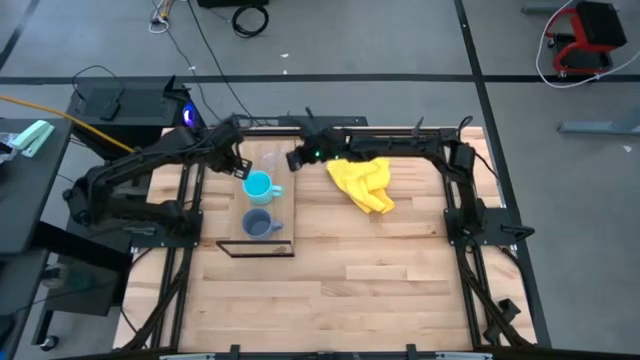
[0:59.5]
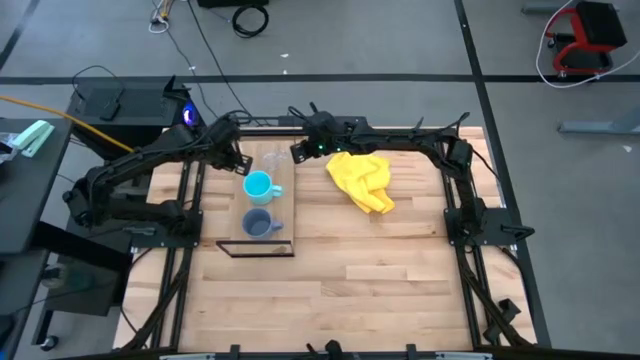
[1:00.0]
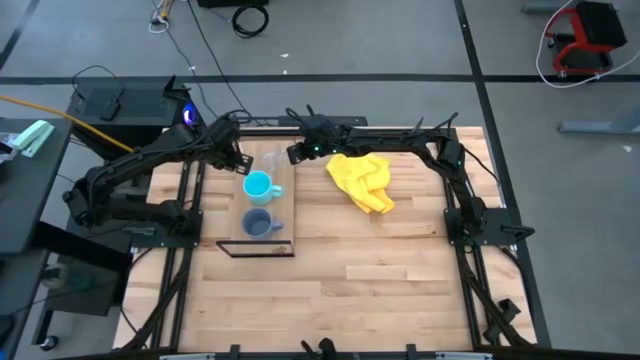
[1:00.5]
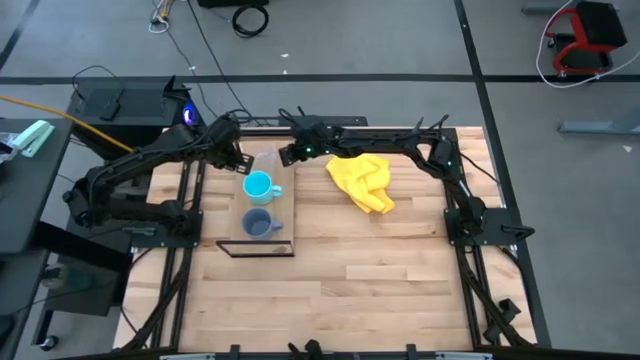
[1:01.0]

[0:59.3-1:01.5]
Task: Stack small to large cups/mugs on shelf
Adjust the transparent mug on the shelf

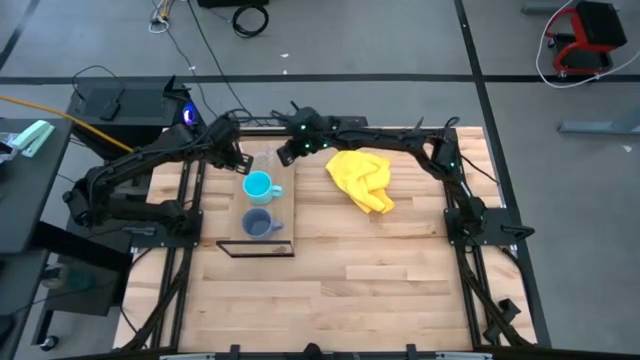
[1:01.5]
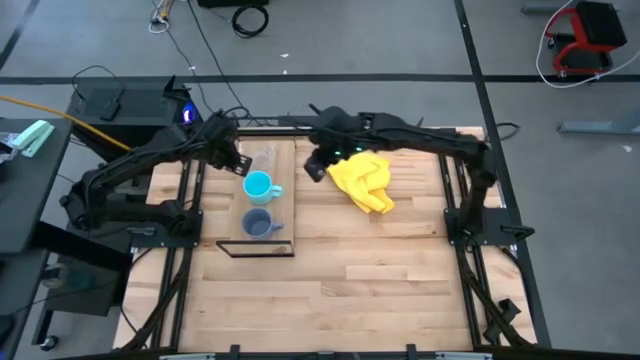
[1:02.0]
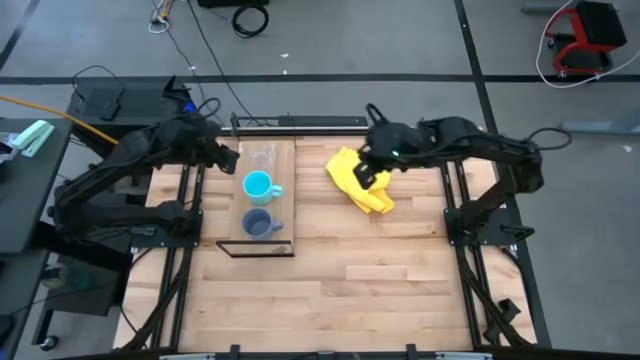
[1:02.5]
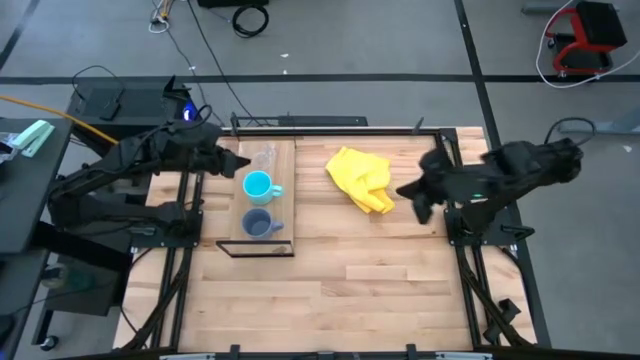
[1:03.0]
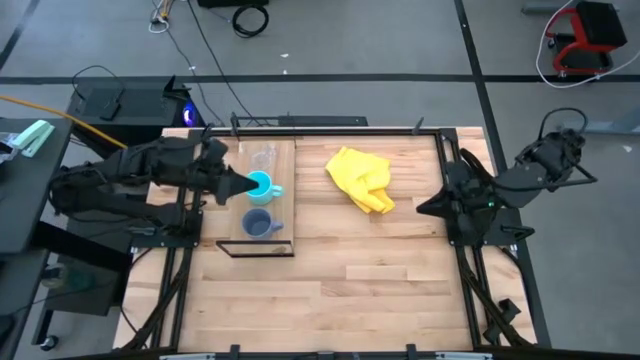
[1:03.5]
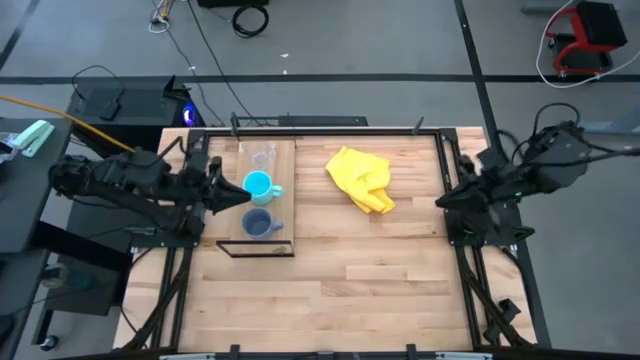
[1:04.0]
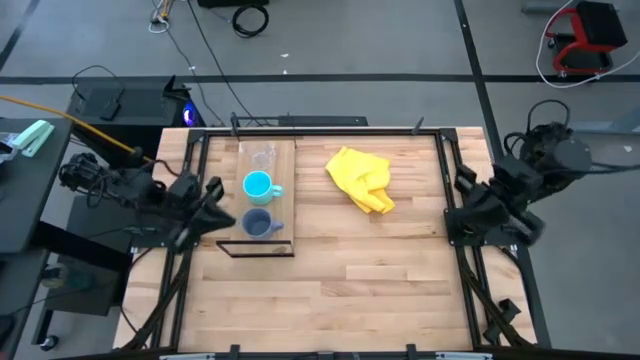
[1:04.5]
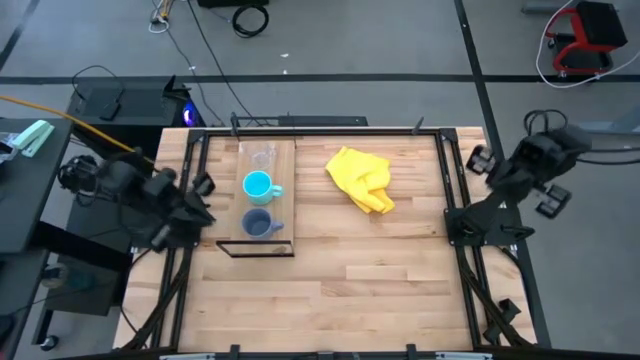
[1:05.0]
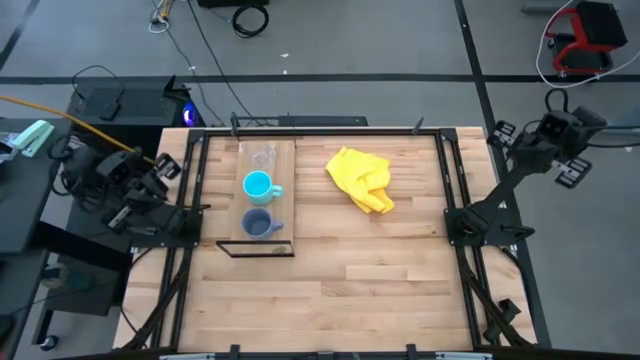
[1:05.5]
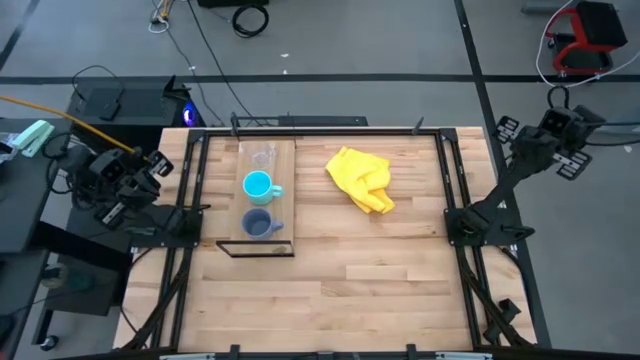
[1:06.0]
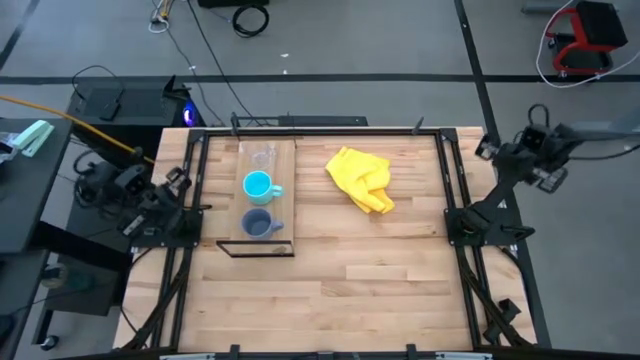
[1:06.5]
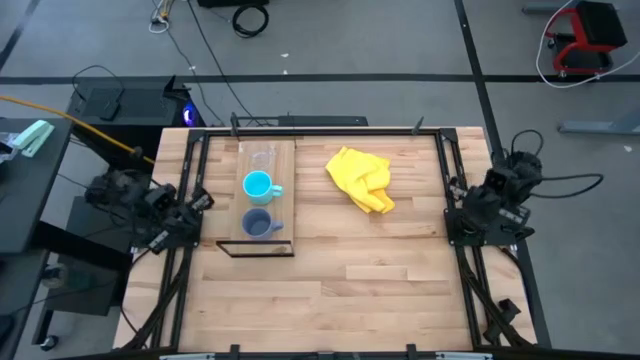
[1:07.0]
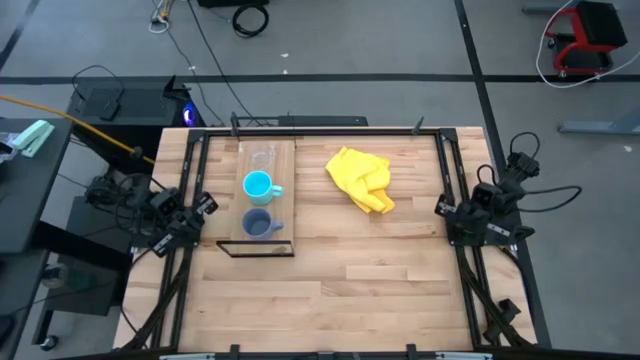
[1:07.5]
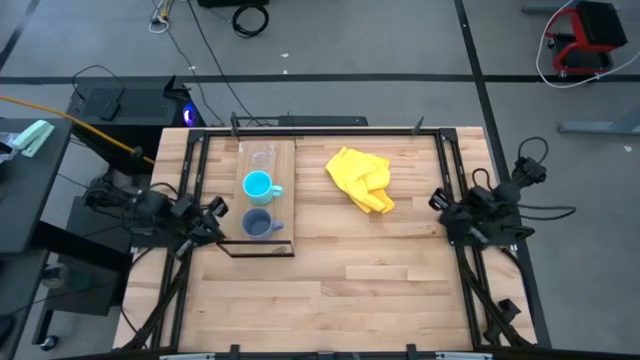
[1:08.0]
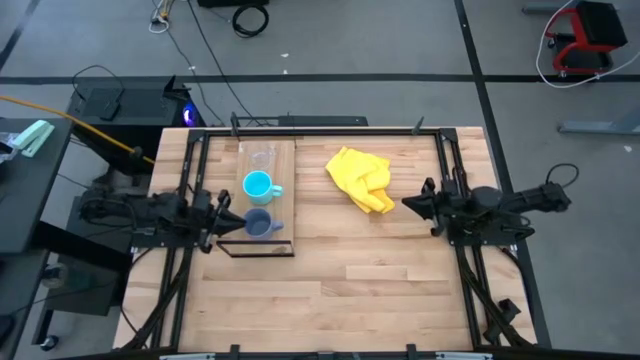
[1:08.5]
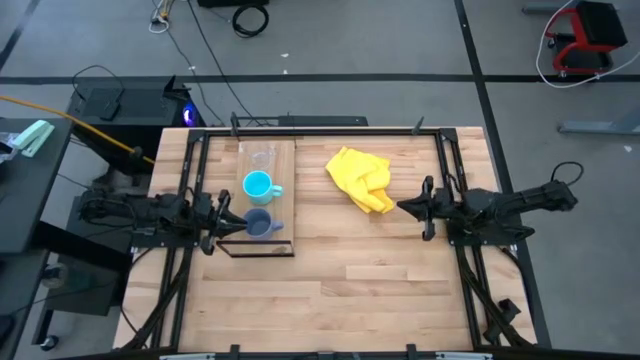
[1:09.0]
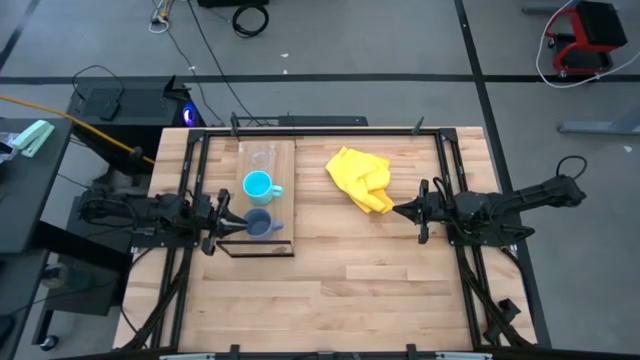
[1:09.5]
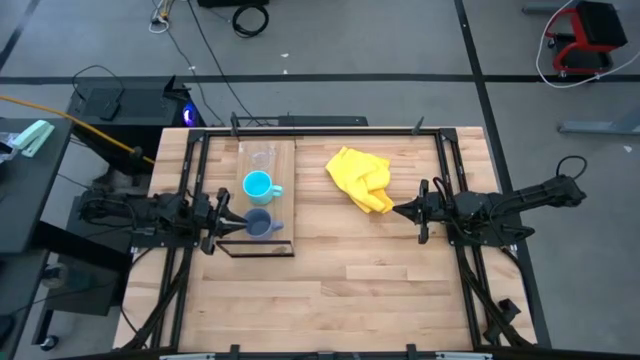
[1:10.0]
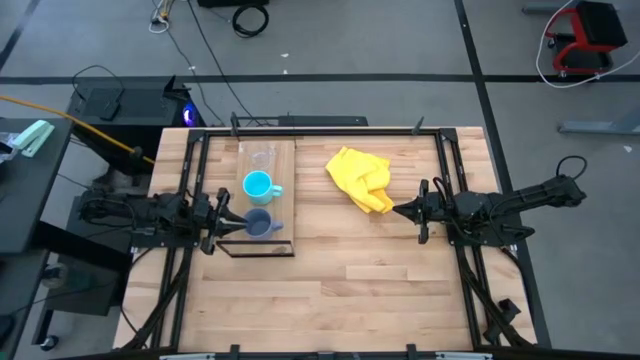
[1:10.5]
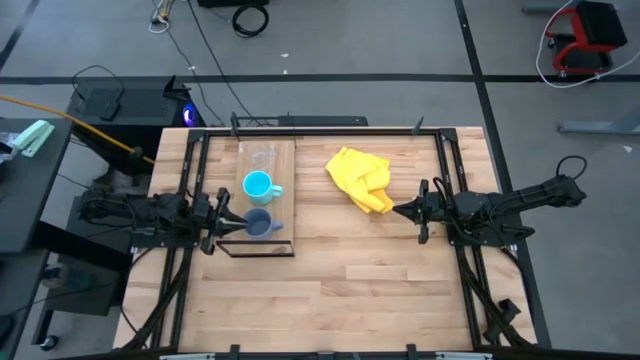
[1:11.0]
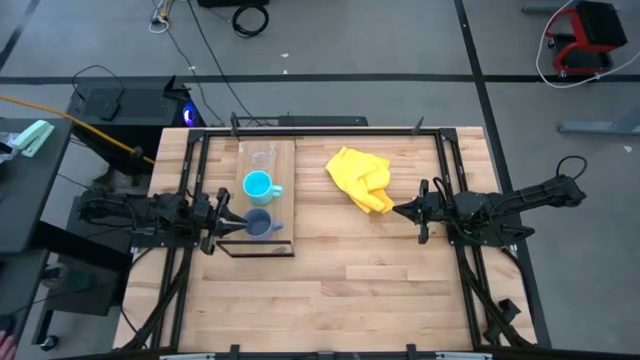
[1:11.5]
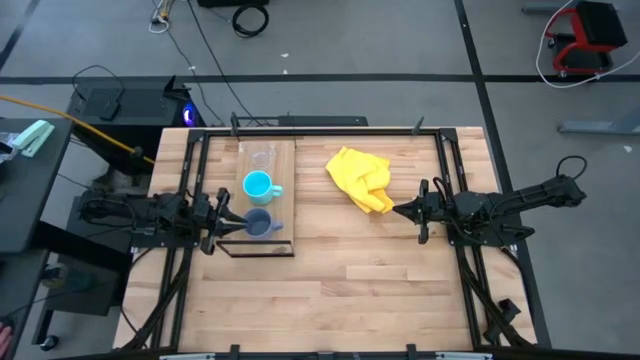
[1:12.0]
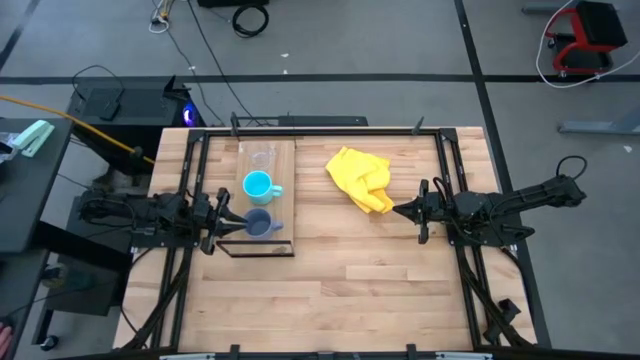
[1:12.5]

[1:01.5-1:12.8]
Return to Home Position

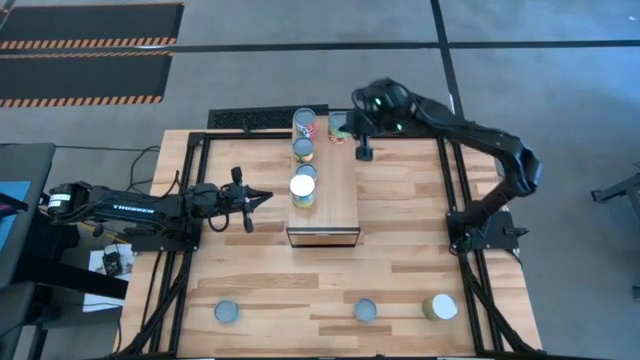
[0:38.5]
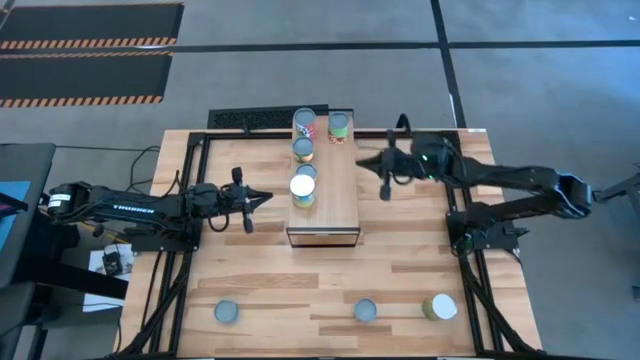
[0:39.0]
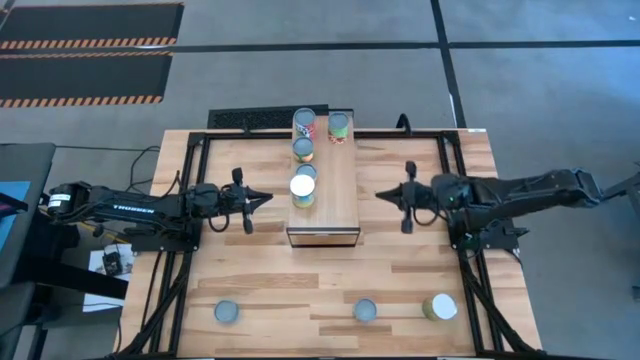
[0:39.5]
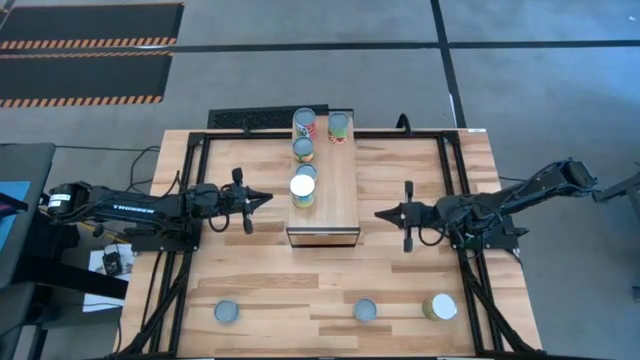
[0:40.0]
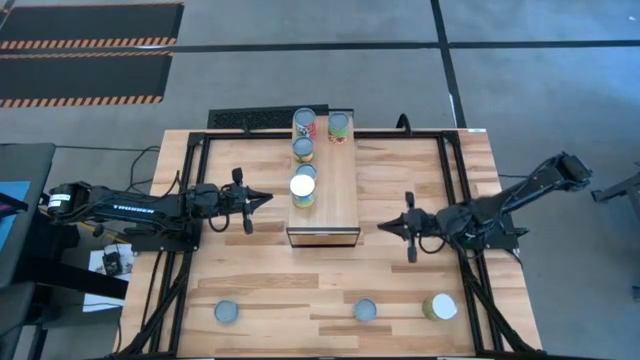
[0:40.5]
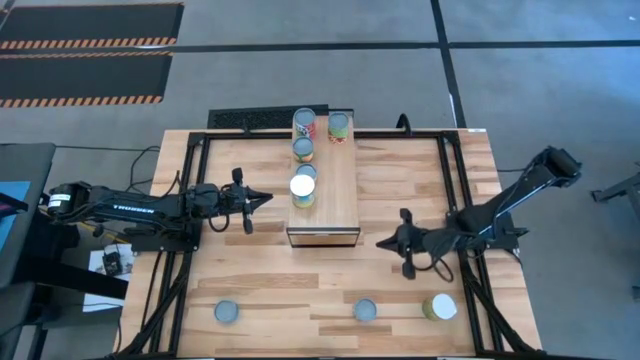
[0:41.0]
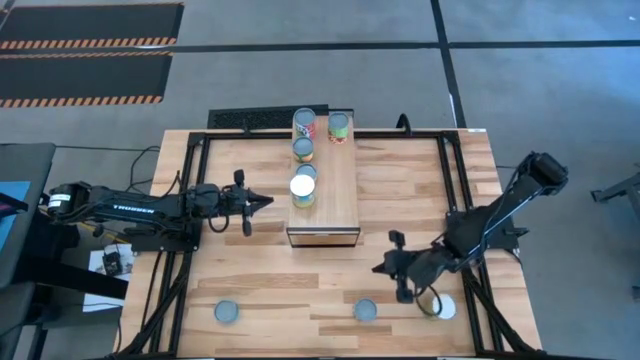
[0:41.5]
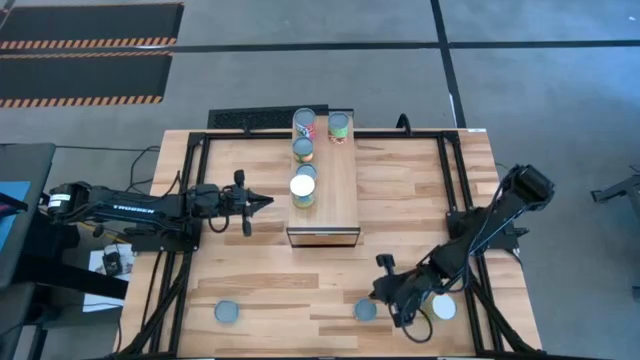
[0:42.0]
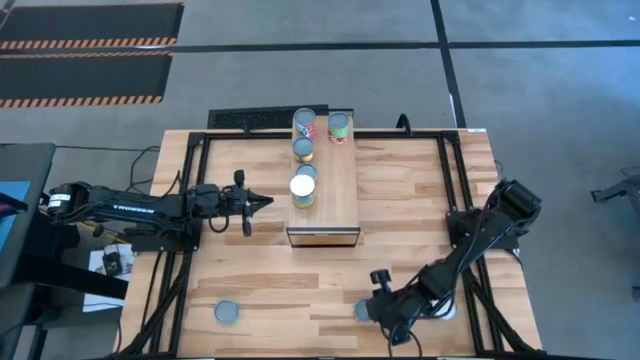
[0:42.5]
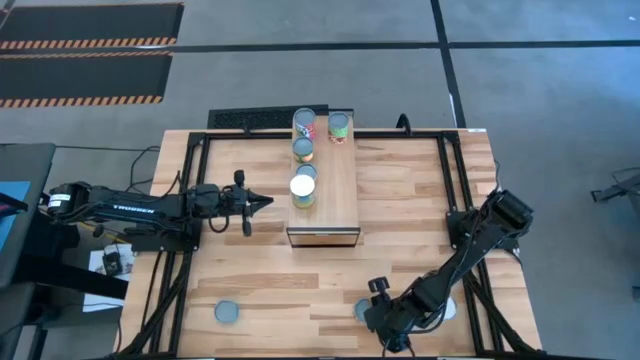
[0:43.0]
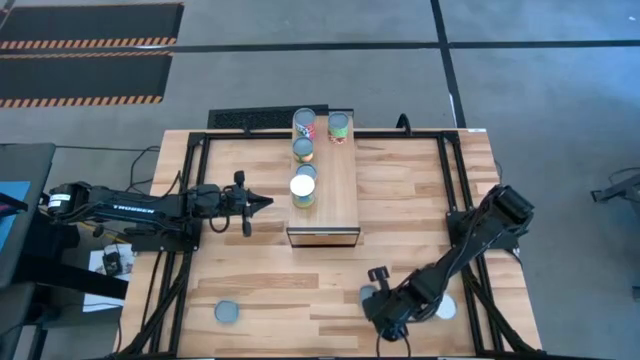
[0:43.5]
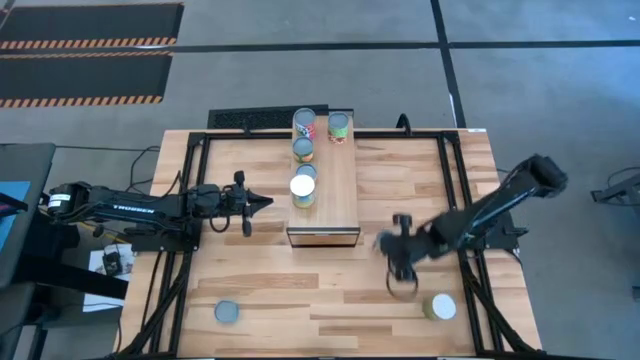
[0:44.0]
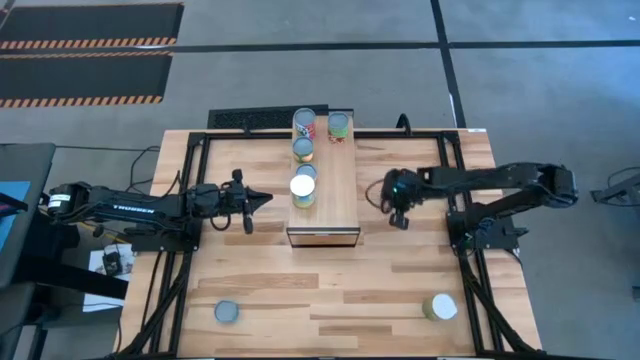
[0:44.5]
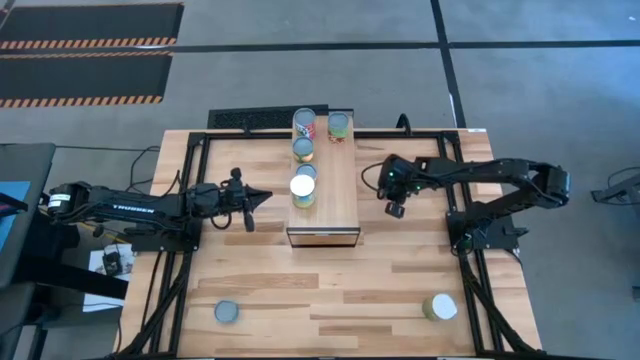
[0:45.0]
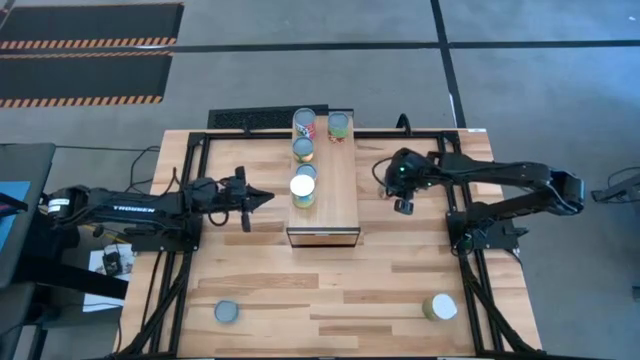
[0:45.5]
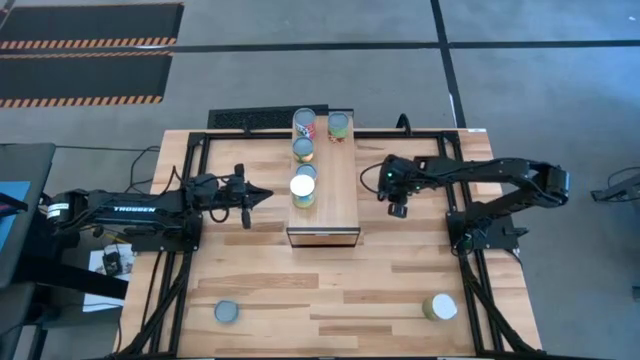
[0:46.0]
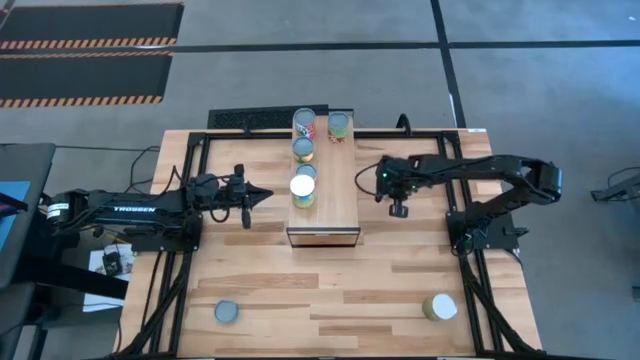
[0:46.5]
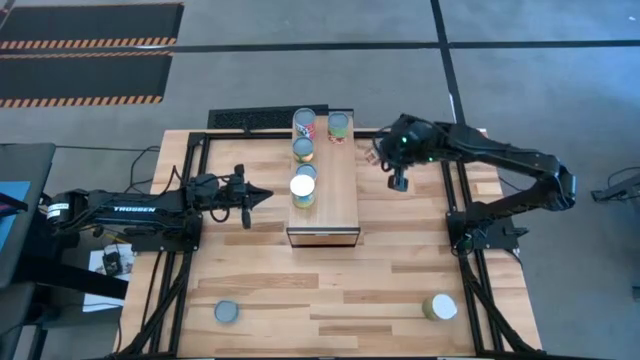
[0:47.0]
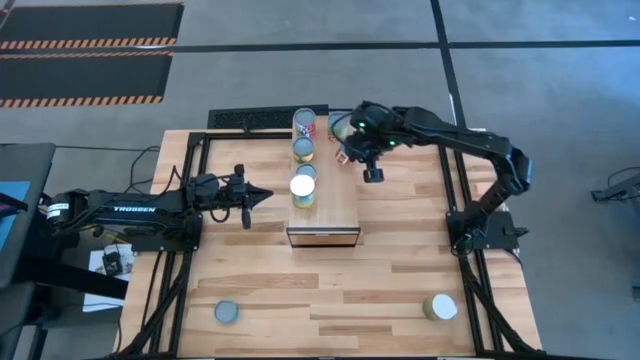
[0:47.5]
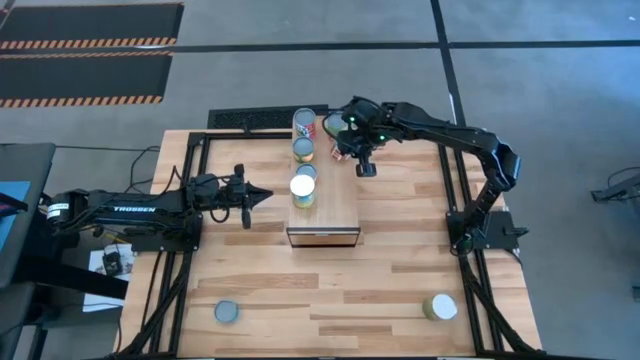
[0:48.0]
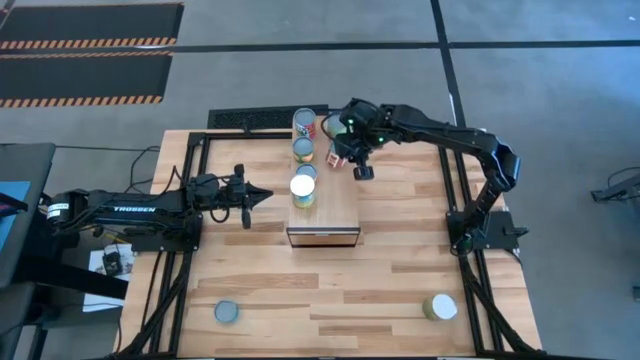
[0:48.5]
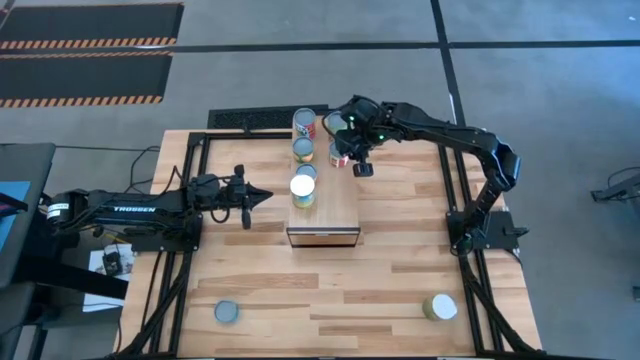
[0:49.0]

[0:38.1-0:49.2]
Task: Pick and place cans onto a shelf
Put the canned tomatoes on the shelf aligned with other cans
